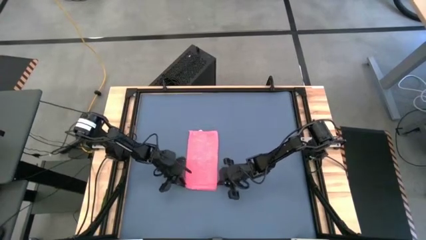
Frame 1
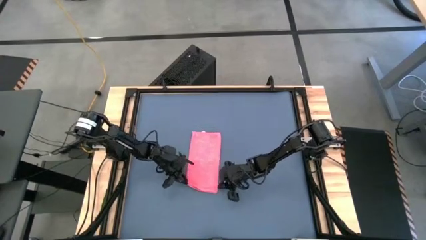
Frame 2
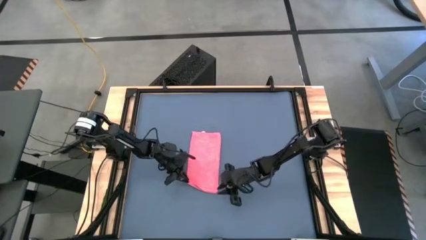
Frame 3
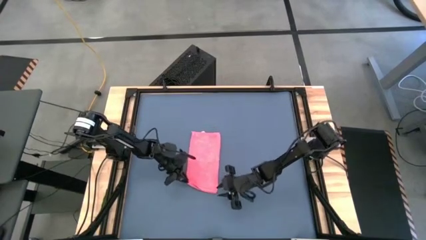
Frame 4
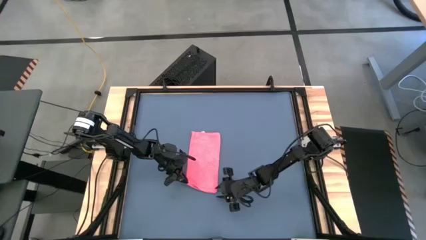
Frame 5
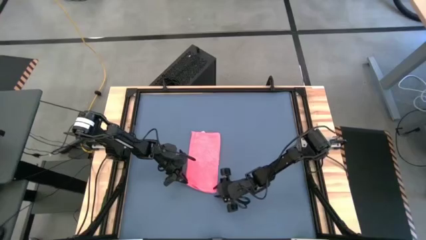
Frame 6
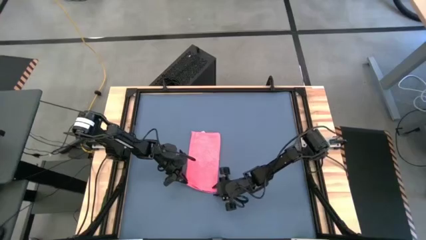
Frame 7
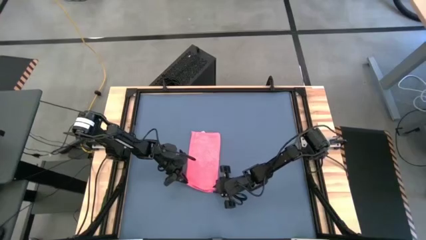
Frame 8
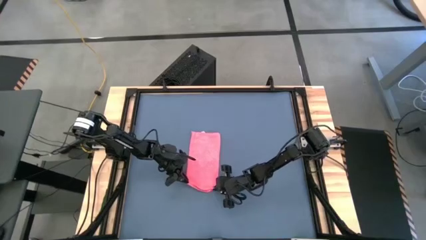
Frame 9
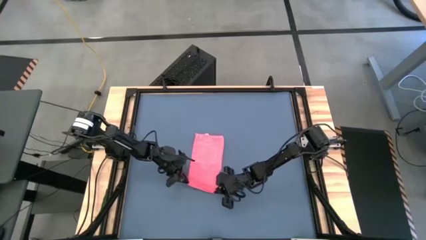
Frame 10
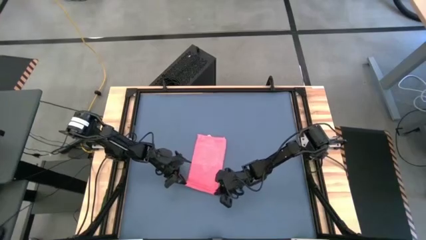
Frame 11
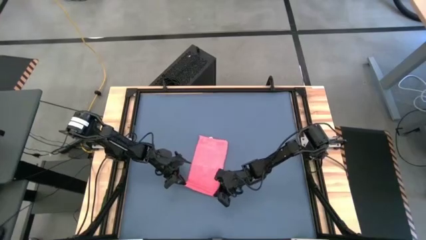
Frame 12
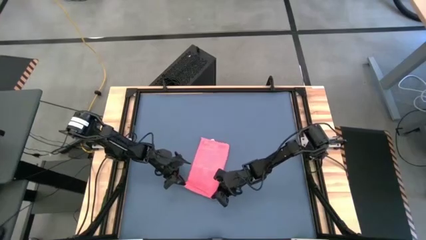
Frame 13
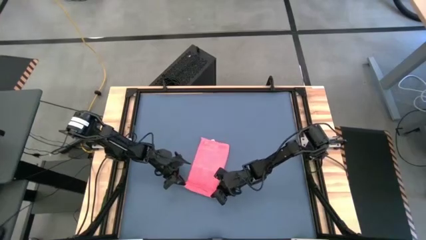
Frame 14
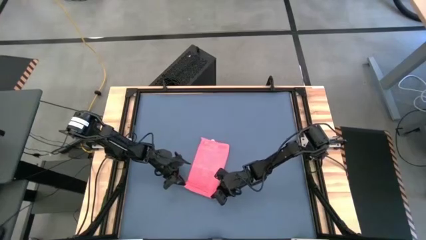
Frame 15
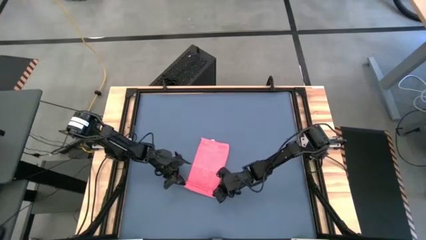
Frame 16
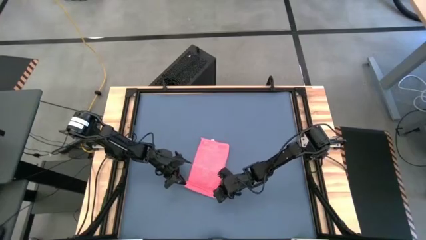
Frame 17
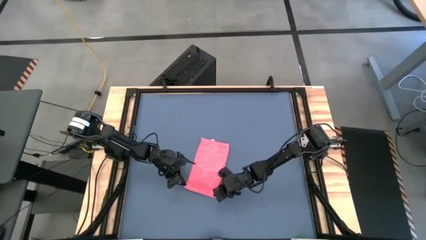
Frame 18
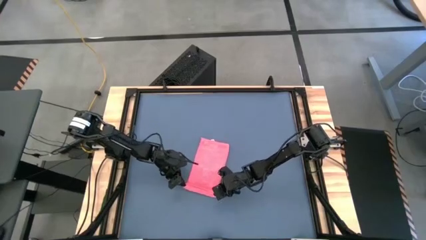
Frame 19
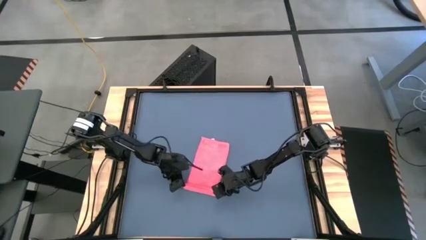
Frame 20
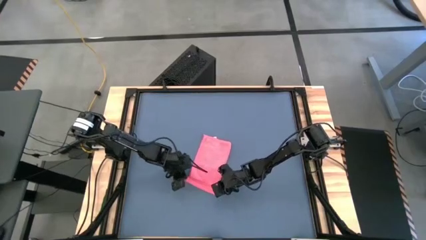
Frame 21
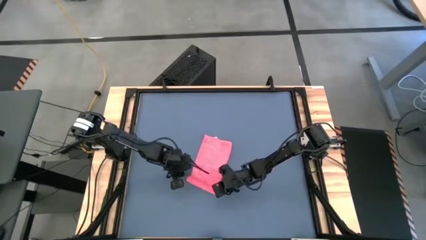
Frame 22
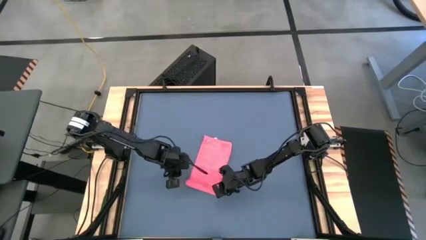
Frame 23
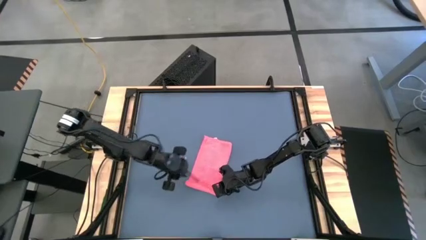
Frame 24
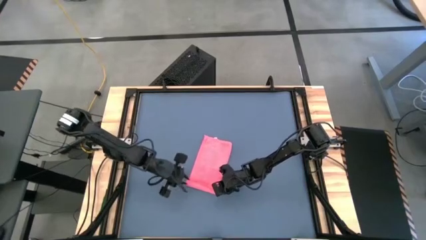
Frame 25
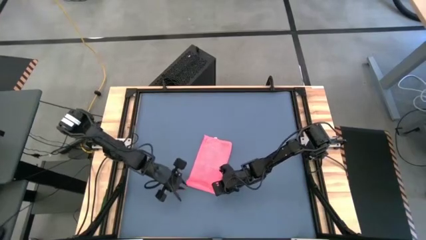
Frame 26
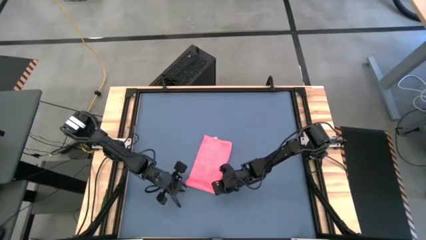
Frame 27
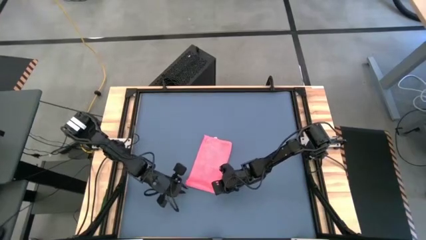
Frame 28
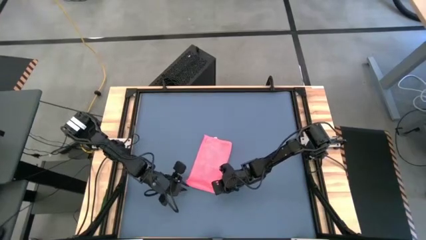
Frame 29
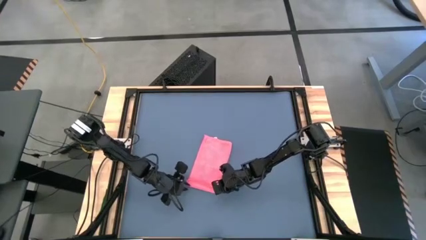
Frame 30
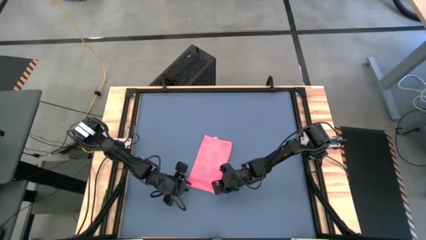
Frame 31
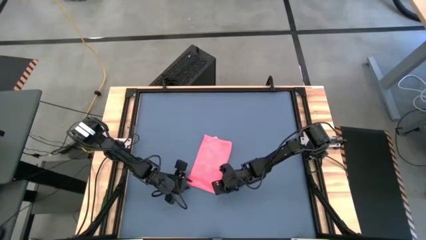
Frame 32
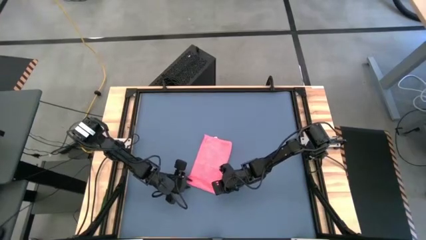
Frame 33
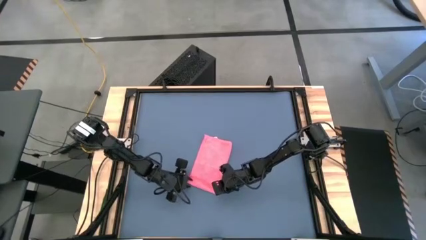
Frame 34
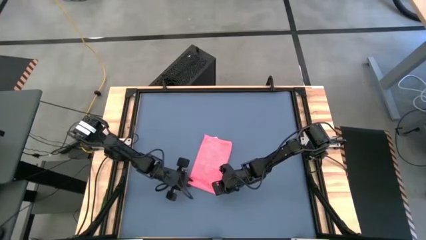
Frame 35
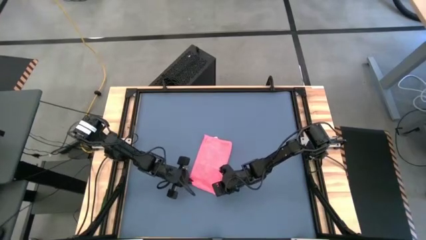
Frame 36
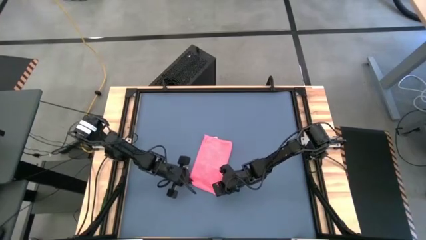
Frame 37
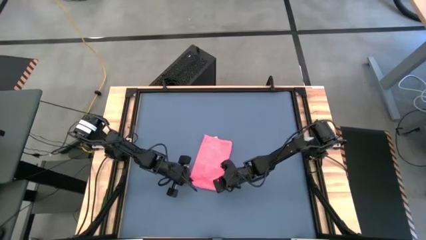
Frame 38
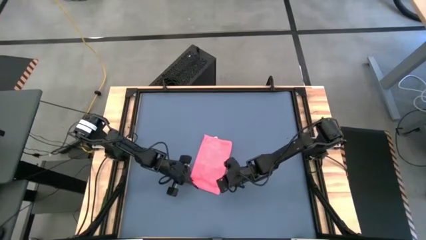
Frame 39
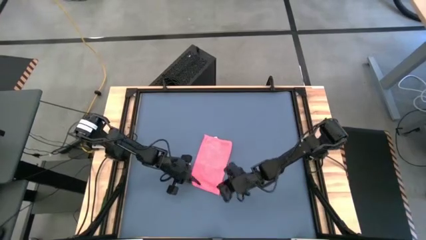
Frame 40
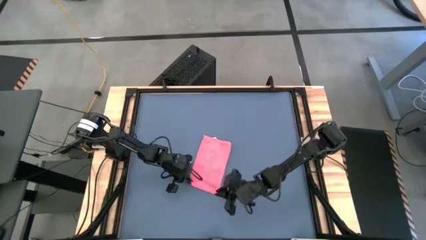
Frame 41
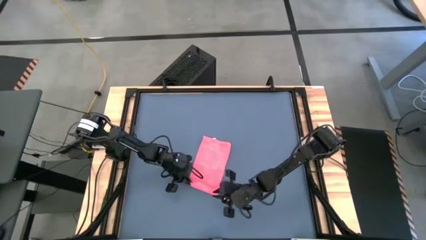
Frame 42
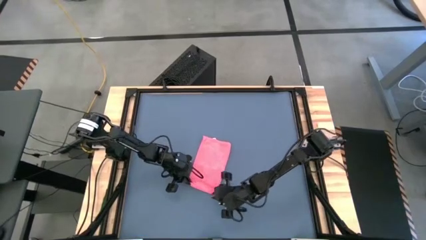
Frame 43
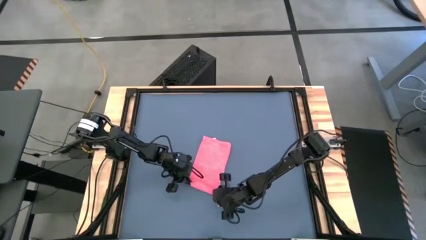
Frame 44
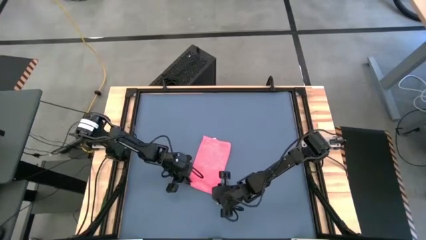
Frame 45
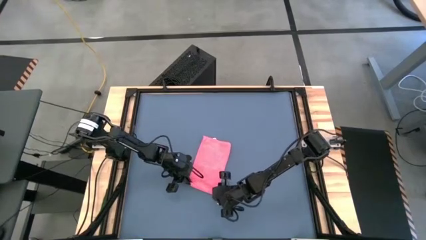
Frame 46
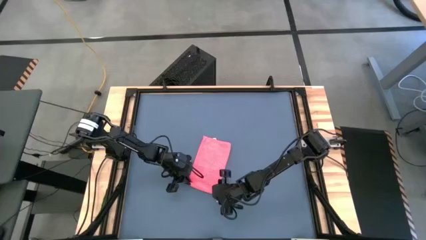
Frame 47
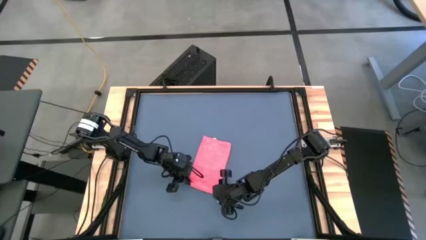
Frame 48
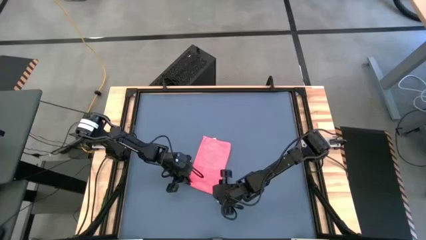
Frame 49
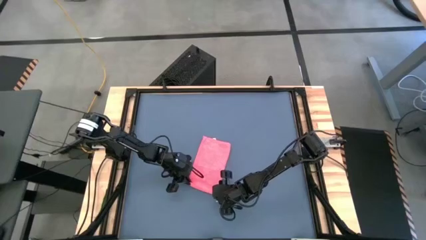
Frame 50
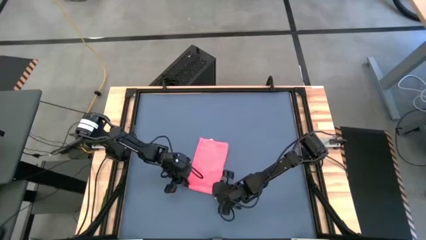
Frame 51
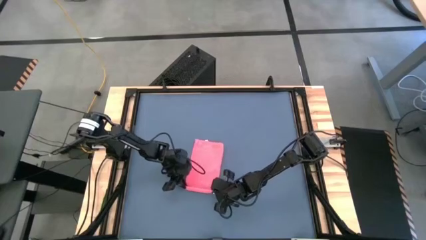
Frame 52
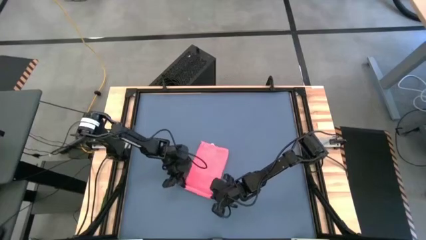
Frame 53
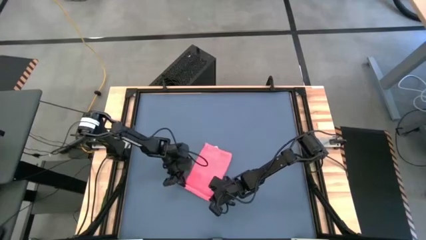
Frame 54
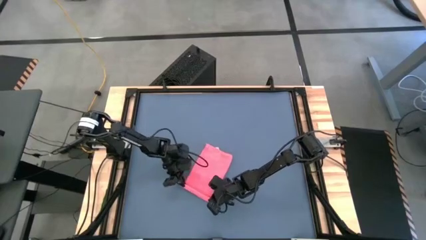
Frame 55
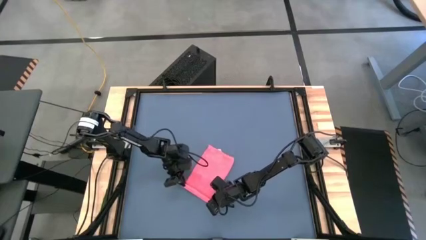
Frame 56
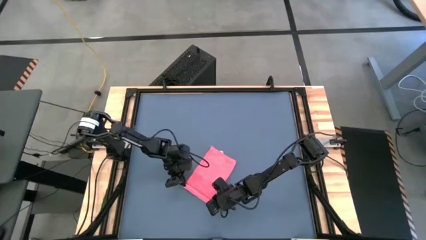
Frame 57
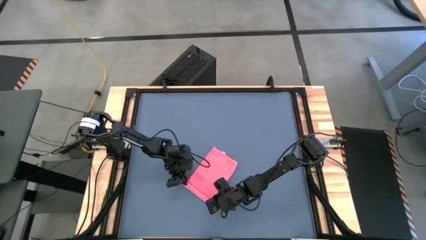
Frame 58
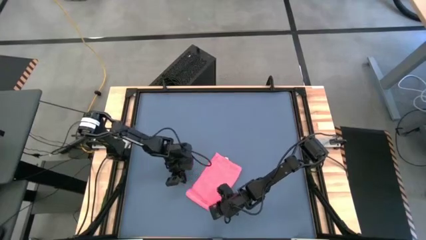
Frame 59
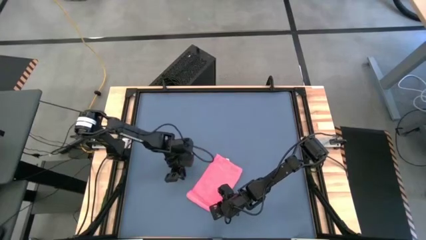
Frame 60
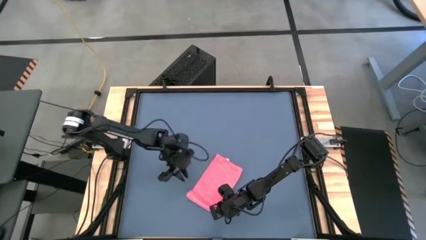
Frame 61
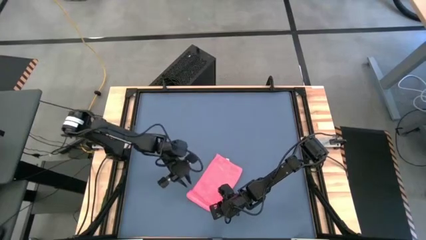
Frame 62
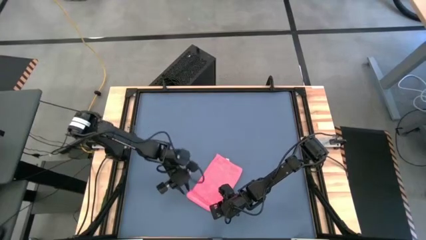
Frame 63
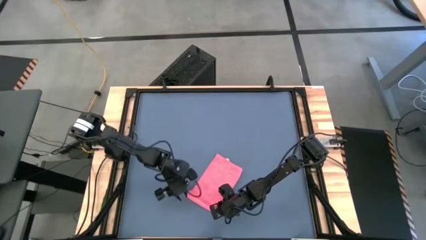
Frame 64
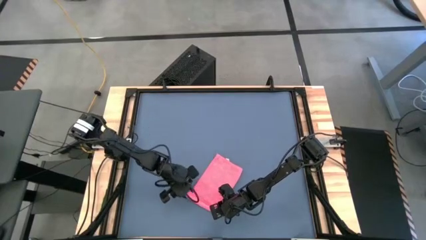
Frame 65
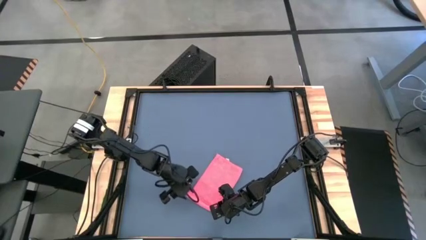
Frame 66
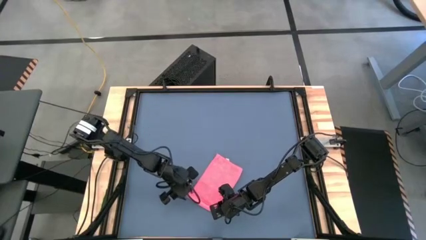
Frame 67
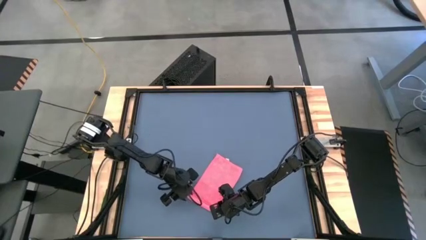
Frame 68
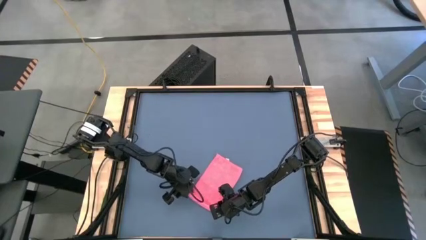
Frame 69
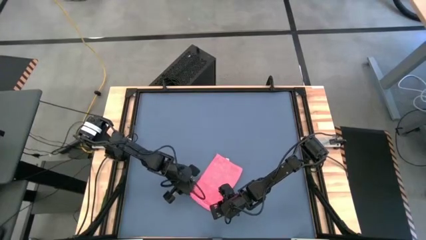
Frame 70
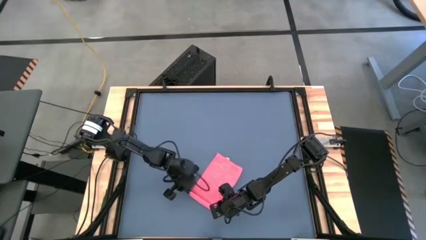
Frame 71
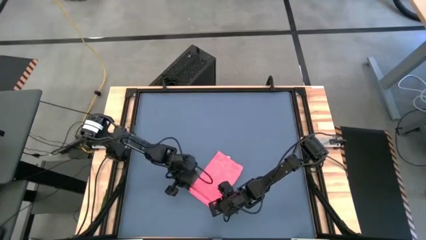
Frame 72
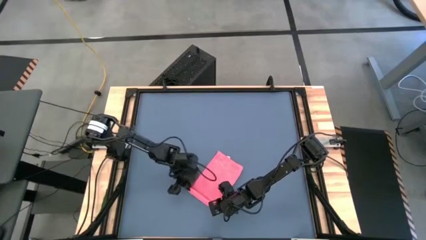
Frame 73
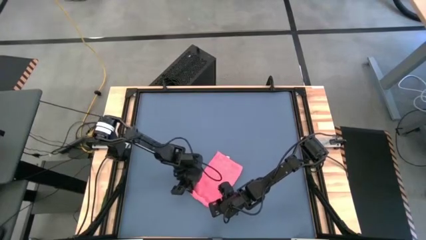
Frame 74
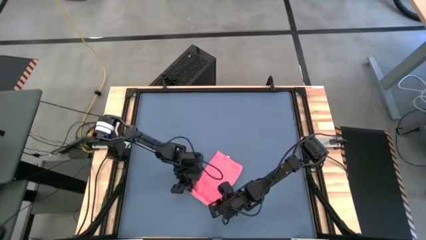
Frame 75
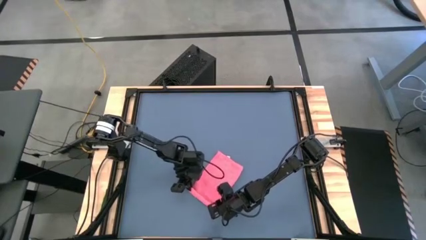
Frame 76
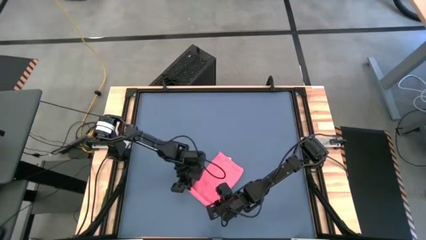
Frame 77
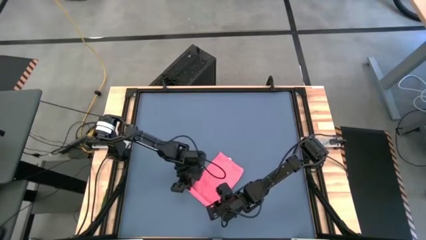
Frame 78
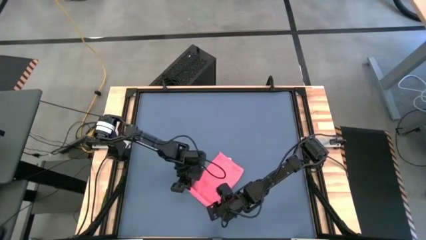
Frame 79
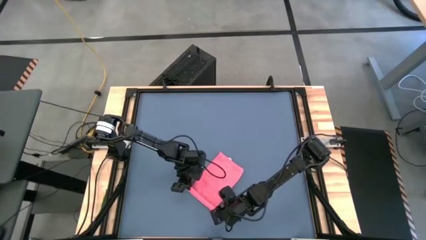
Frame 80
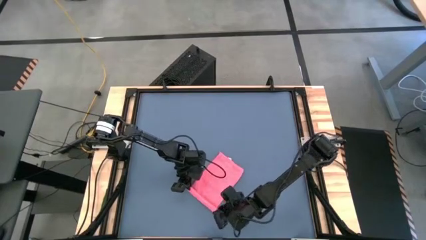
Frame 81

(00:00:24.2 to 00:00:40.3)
Task: Roll towel
Roll the red microfiber cloth
